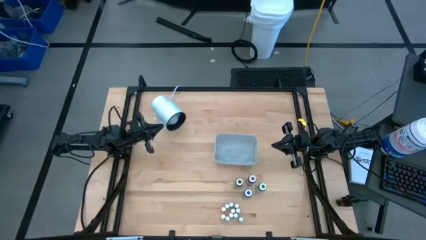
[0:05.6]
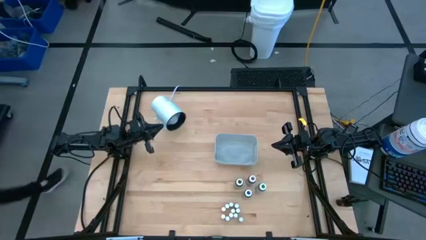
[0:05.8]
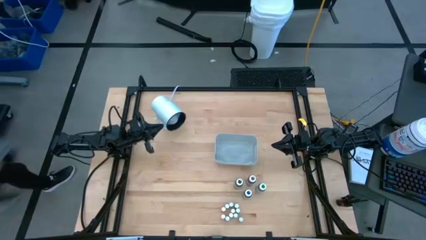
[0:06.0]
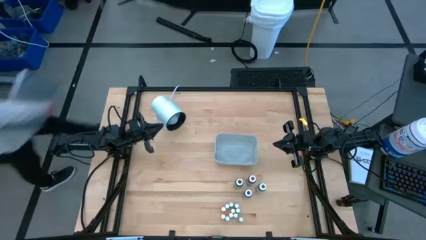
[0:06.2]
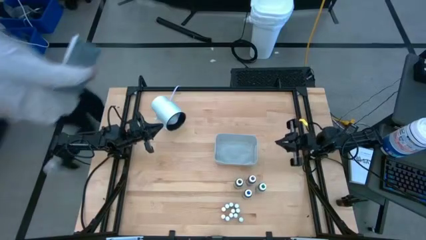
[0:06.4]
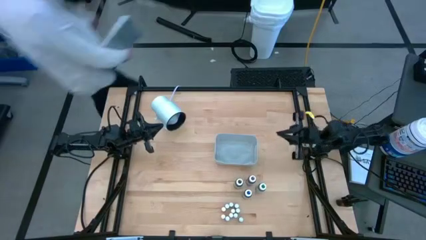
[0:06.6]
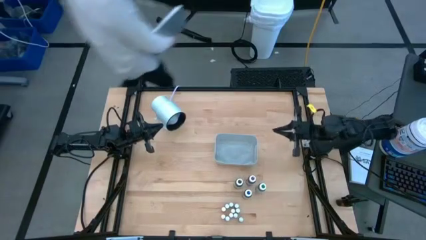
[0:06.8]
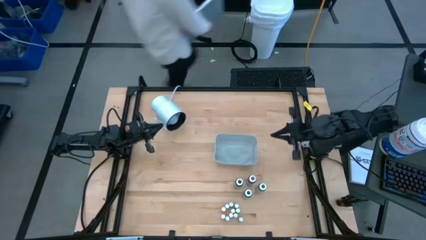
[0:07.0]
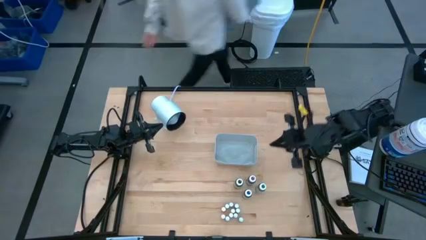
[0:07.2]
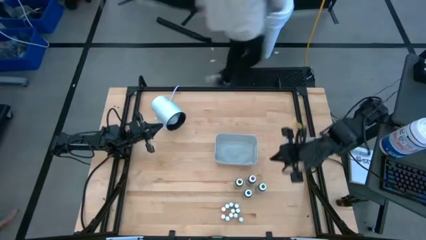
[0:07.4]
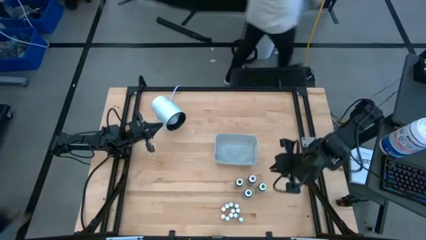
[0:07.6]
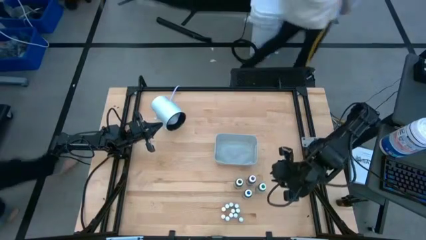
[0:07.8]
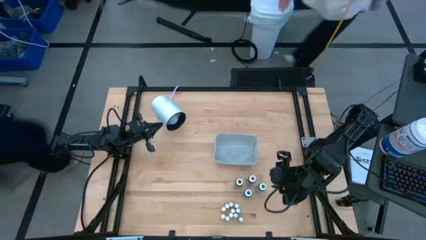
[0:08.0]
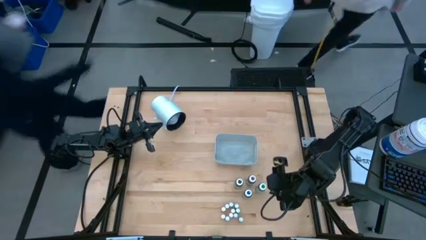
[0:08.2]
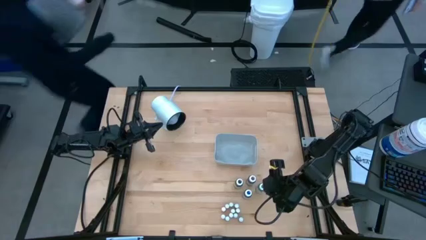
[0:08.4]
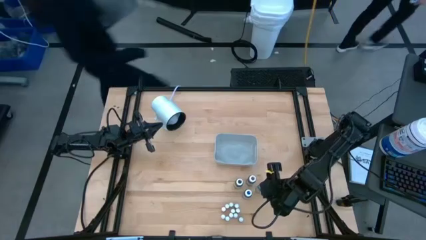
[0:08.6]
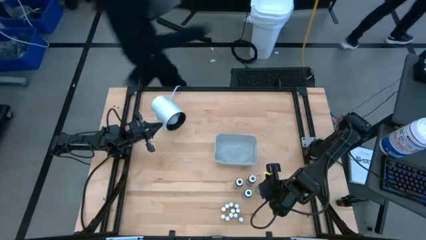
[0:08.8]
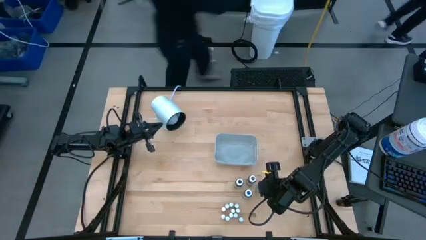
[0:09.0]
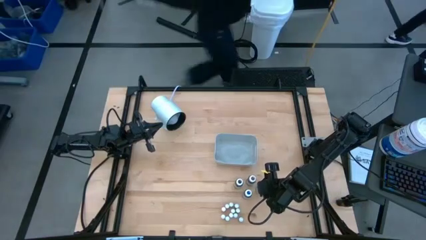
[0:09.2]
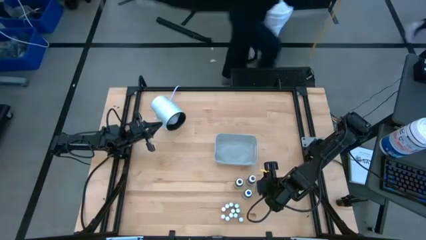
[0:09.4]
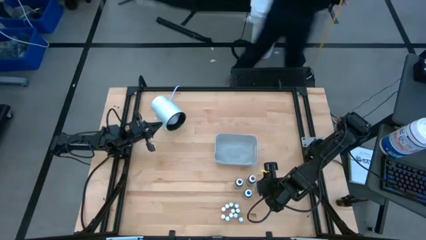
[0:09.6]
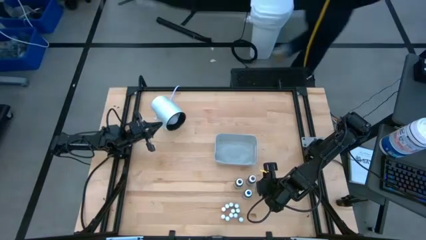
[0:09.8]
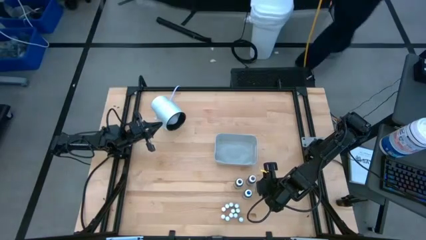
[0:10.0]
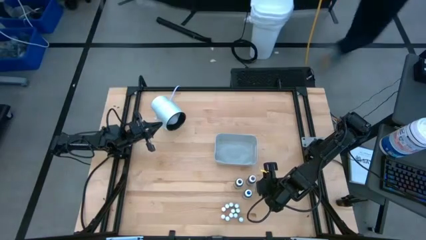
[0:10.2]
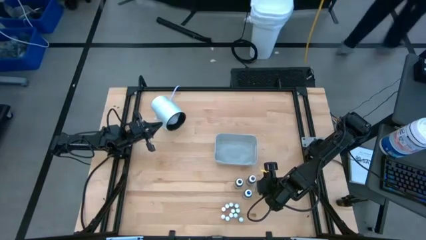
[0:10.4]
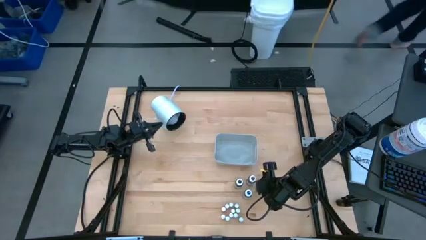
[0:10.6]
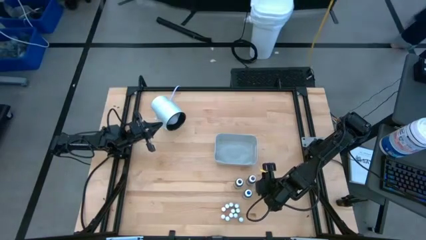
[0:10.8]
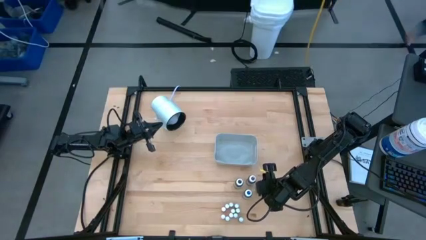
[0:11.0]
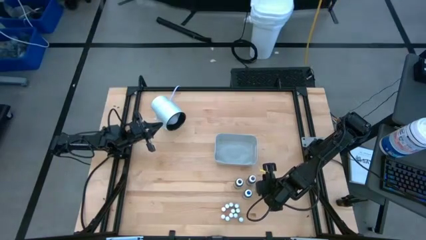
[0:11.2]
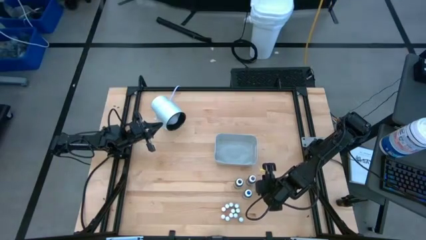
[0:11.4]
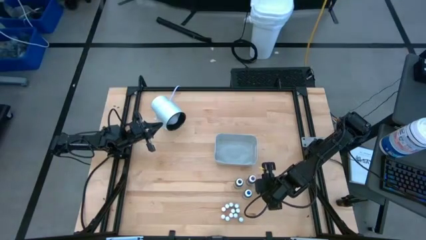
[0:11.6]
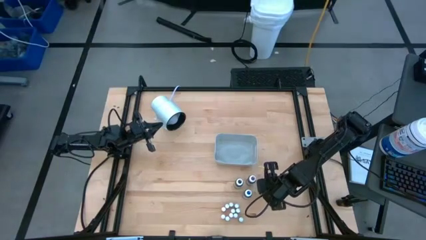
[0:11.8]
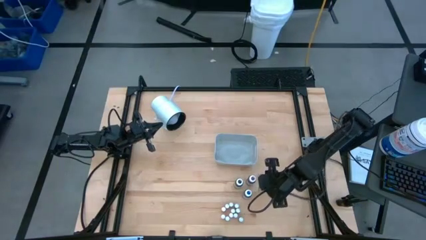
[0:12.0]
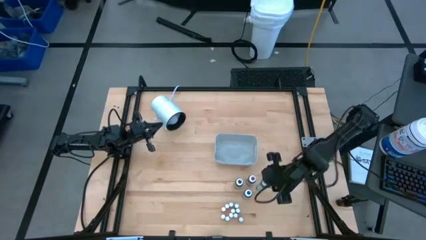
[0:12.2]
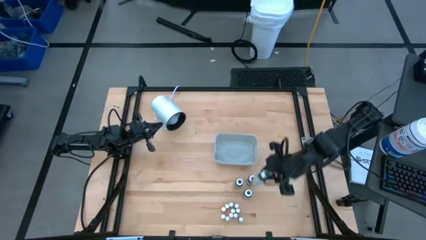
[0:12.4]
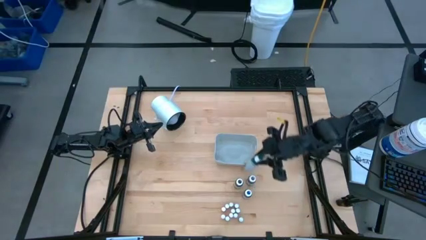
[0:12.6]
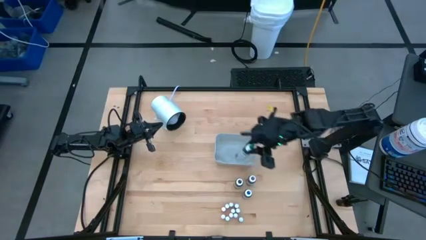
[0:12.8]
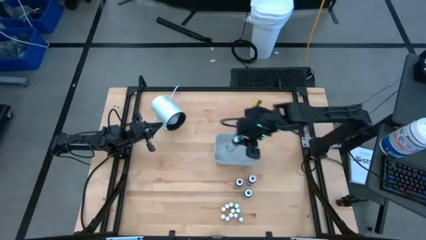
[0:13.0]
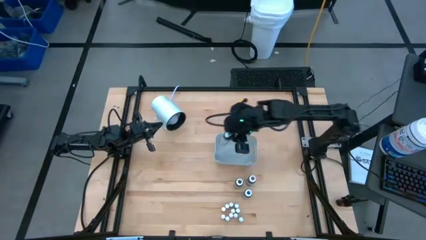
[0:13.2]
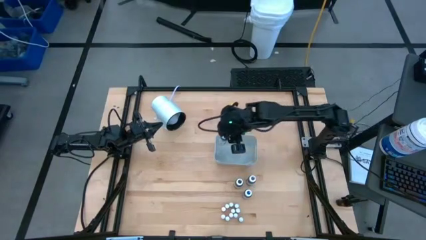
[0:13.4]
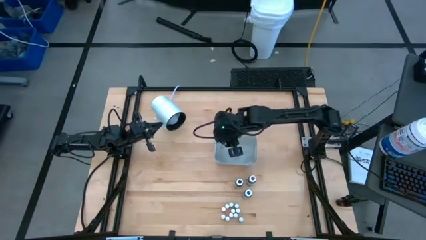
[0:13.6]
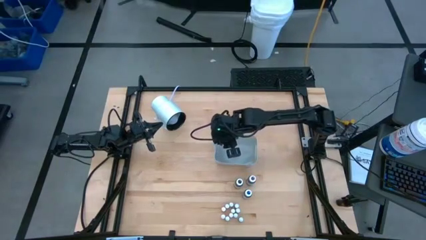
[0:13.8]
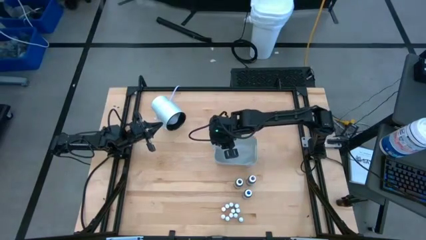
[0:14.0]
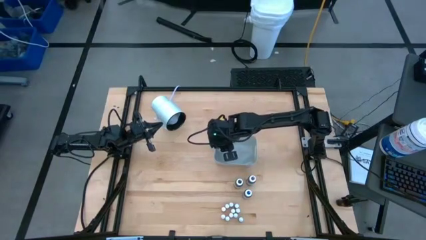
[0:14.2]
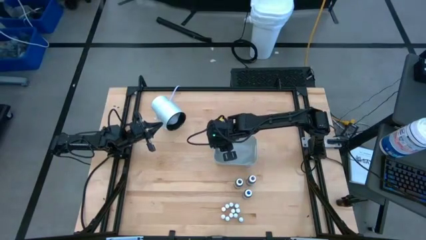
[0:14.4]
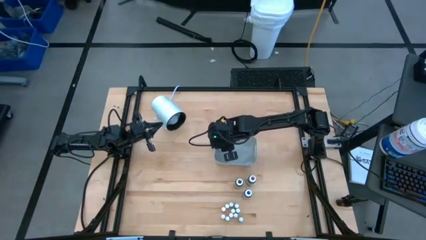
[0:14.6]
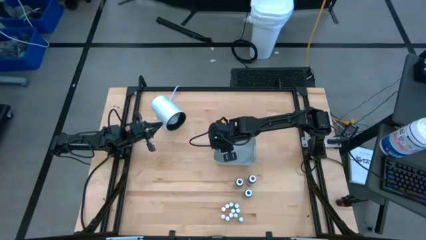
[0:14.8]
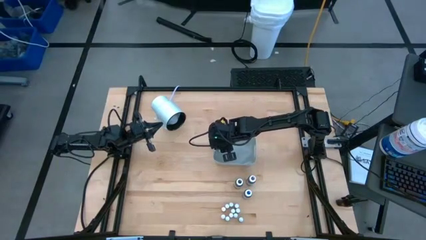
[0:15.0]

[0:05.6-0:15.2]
Task: Pick & Place food coloring
Put the big green food coloring bottle into the gray bin

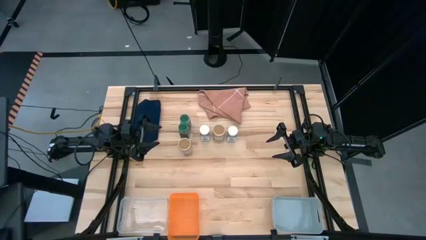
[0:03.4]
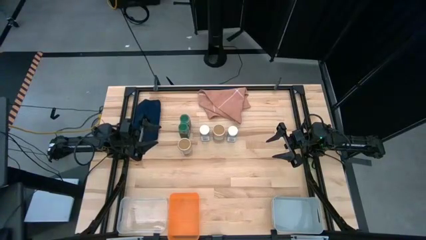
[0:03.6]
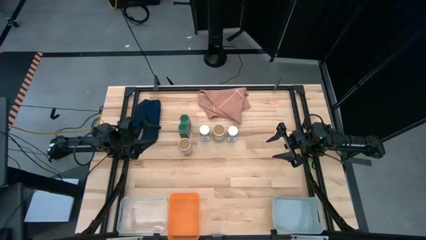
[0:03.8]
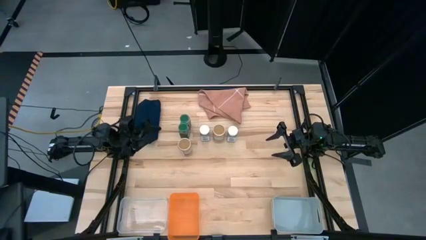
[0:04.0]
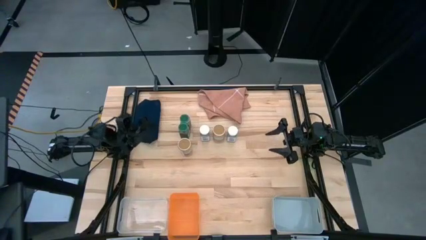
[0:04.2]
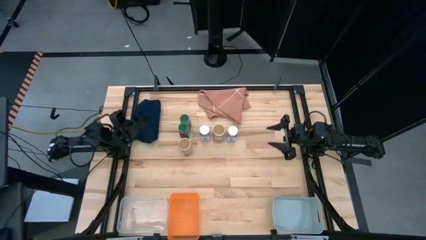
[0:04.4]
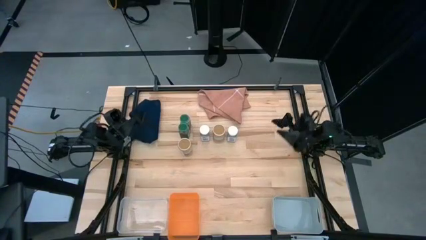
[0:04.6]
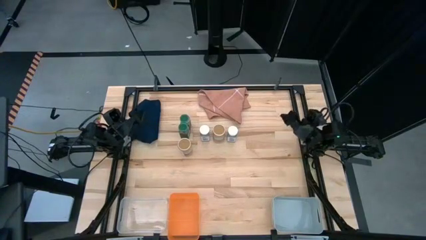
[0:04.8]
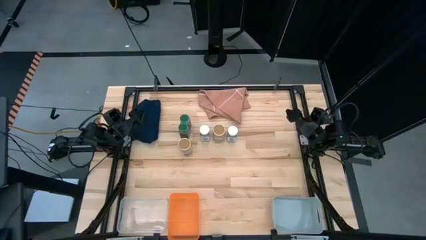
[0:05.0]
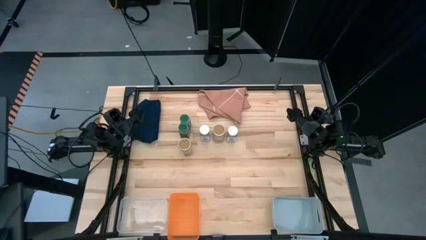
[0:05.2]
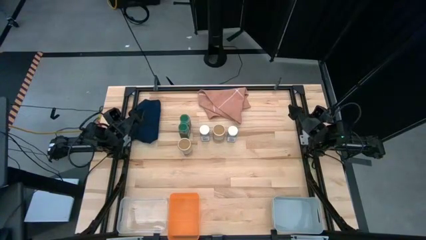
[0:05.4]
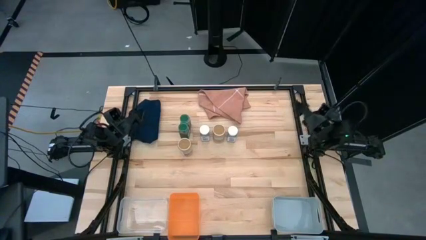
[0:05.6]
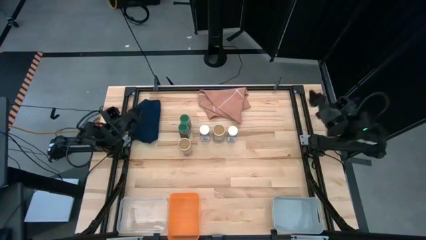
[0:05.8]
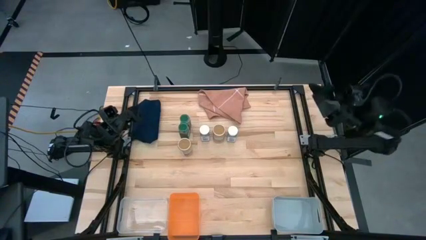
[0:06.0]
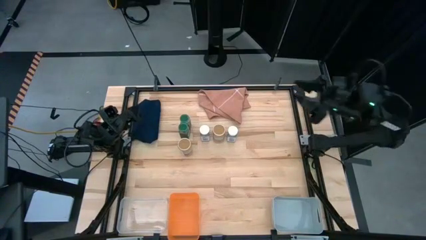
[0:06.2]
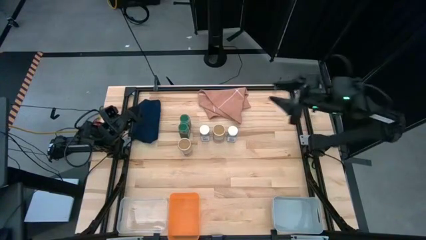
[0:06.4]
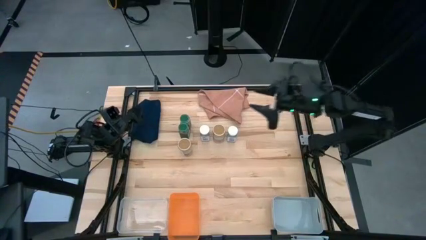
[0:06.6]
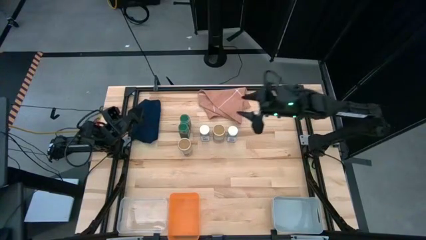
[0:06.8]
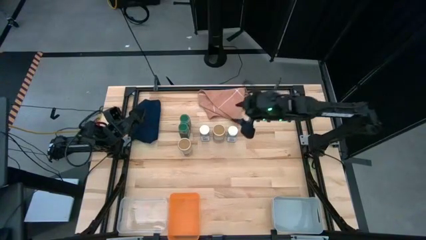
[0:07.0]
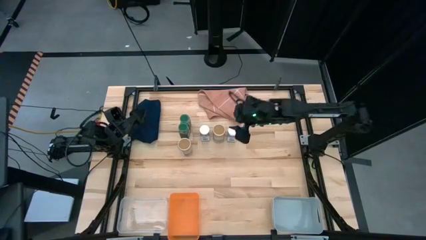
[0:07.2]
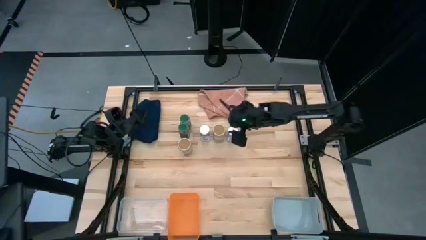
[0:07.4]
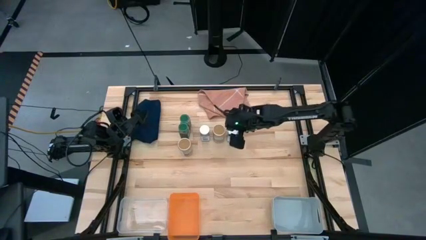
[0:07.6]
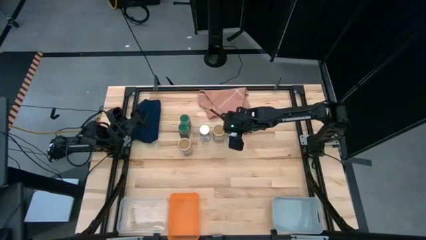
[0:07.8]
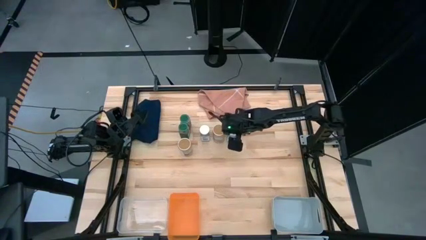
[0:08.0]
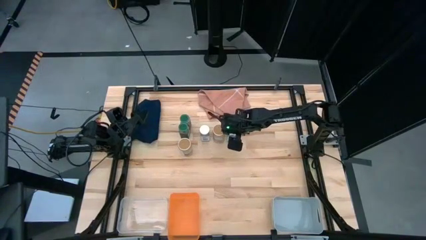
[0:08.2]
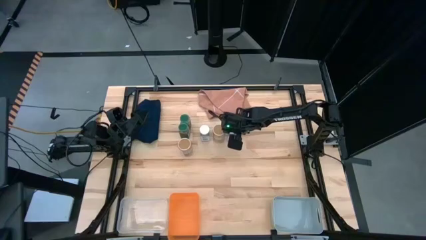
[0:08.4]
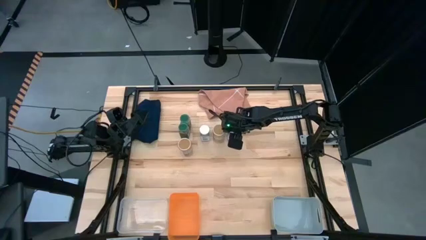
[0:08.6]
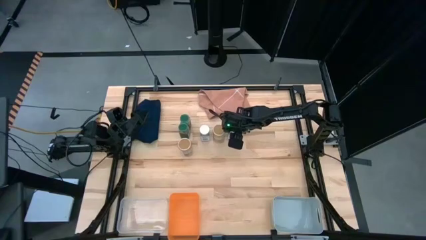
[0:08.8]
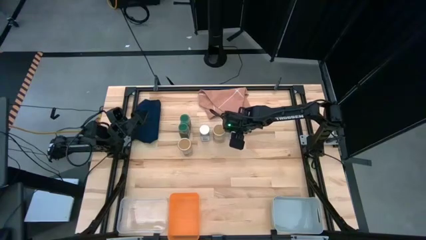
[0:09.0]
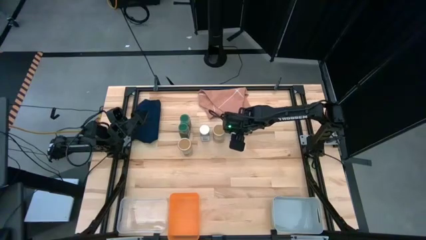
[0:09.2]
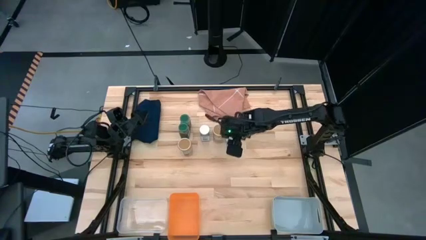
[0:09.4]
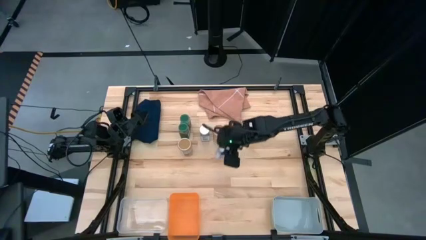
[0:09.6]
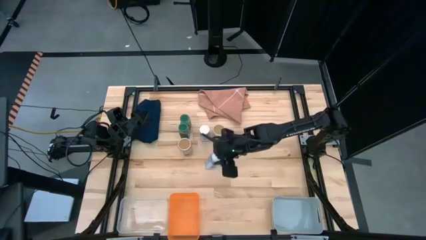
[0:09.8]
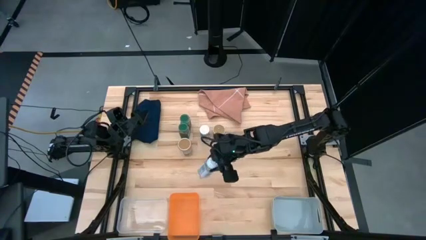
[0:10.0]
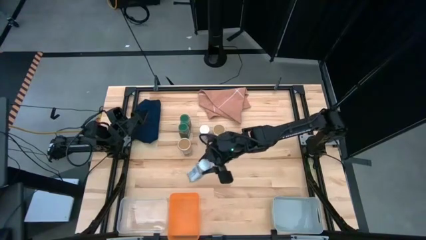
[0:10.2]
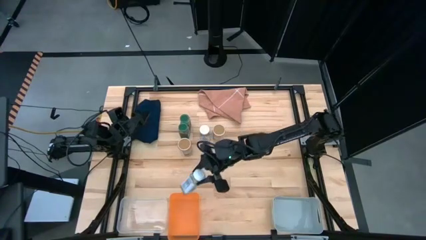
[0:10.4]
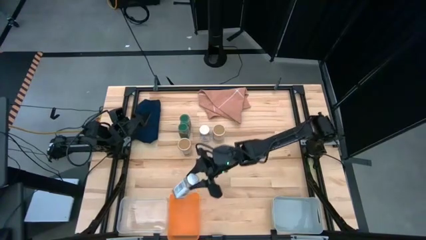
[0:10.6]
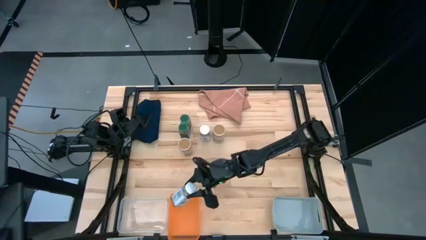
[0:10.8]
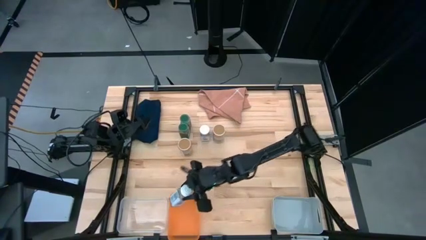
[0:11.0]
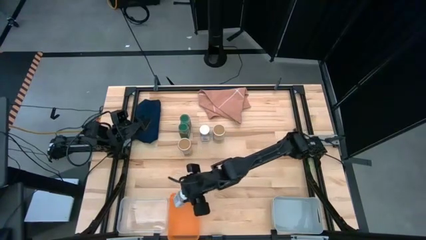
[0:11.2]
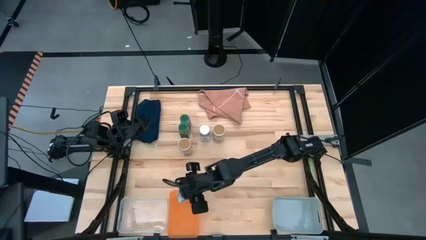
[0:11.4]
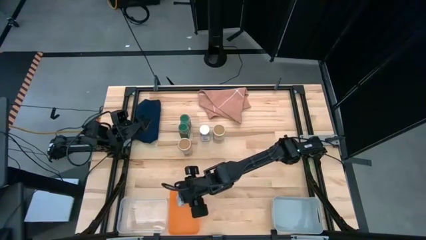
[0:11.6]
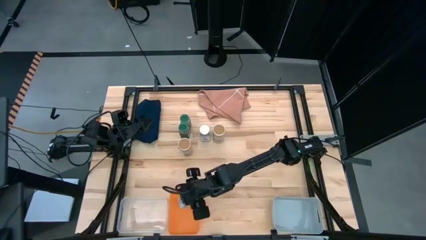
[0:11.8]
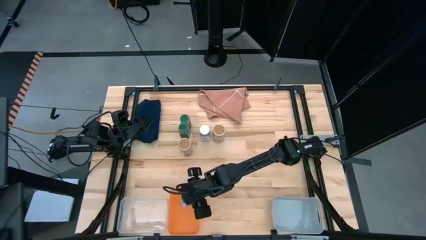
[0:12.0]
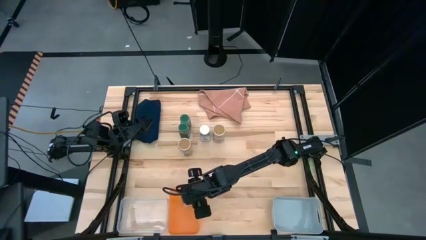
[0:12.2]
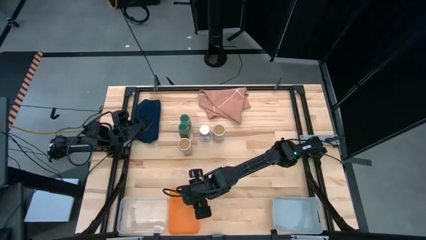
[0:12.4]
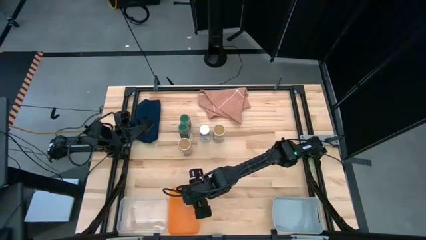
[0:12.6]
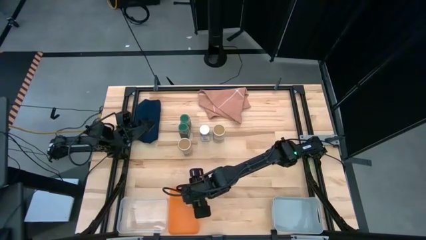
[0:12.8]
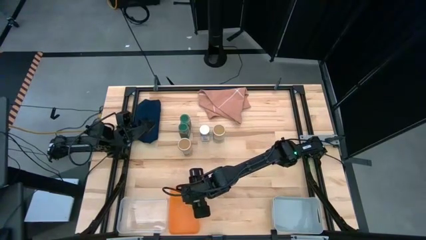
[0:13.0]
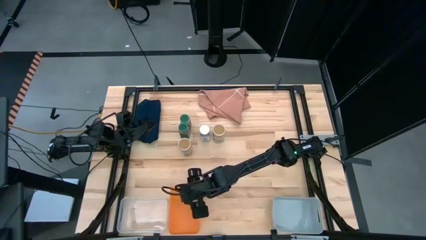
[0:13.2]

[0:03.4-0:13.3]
Task: Sort spices by type
Put the right white seasoning bottle into the orange bin
